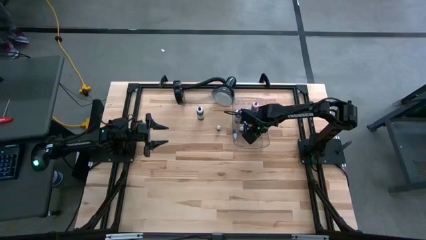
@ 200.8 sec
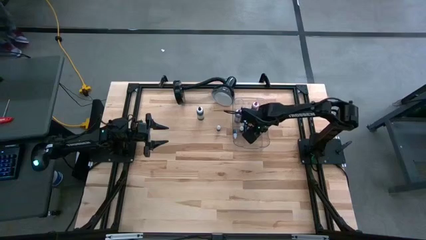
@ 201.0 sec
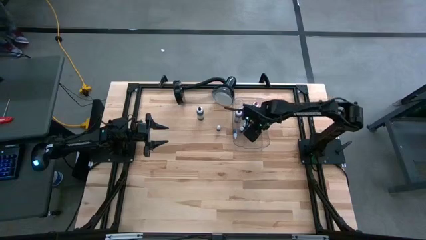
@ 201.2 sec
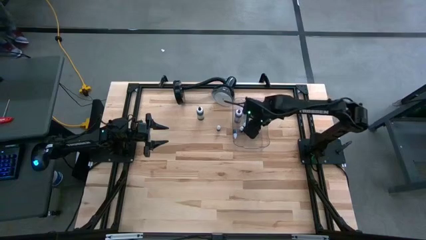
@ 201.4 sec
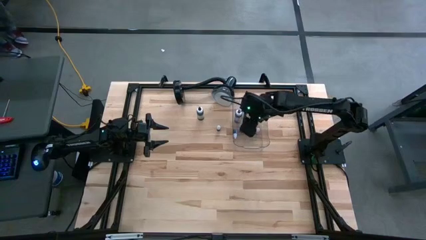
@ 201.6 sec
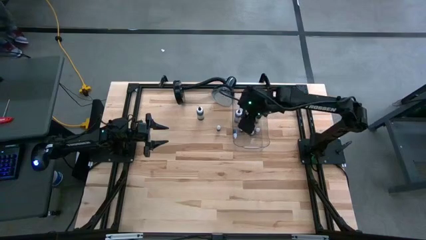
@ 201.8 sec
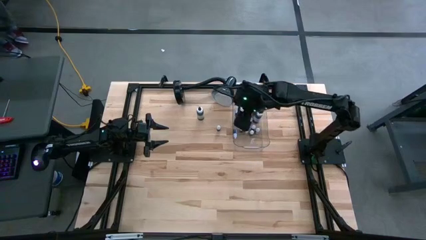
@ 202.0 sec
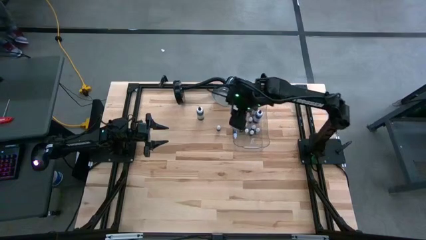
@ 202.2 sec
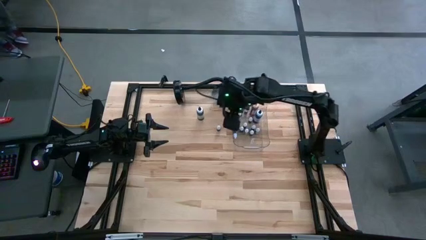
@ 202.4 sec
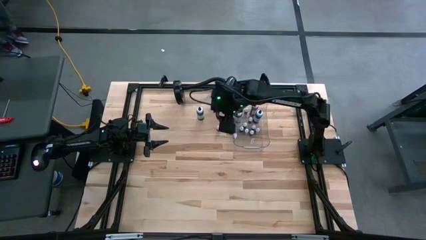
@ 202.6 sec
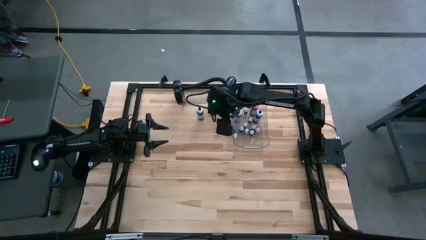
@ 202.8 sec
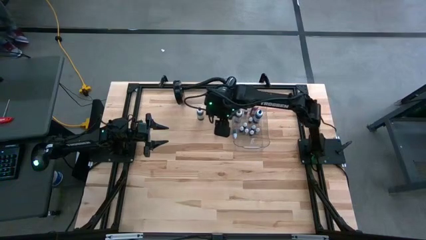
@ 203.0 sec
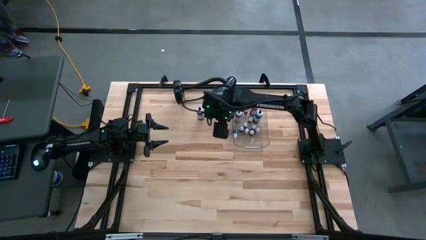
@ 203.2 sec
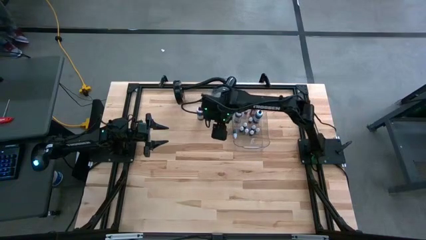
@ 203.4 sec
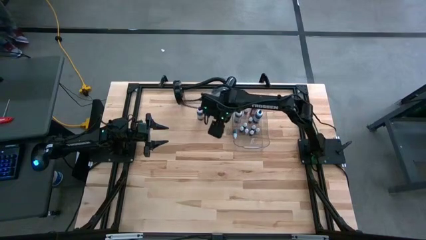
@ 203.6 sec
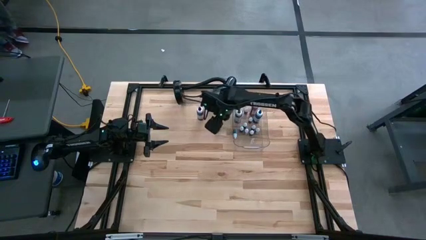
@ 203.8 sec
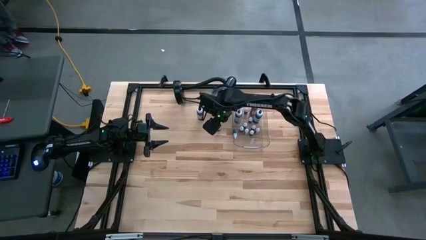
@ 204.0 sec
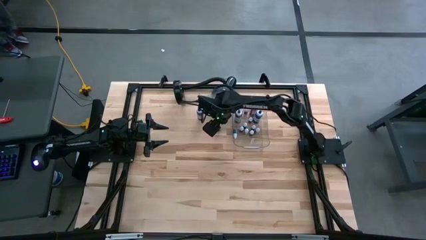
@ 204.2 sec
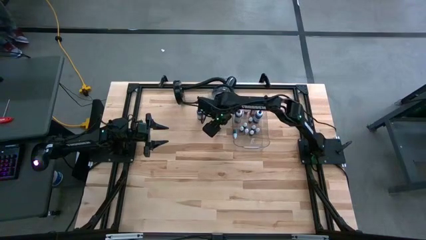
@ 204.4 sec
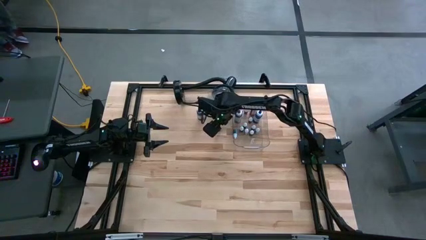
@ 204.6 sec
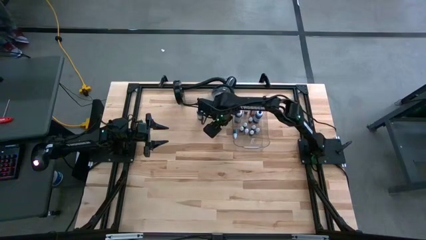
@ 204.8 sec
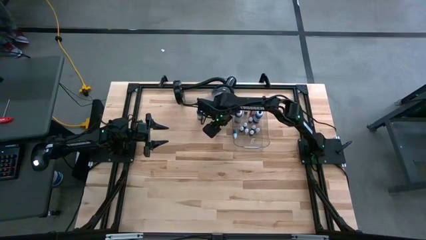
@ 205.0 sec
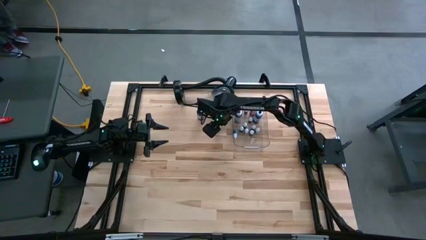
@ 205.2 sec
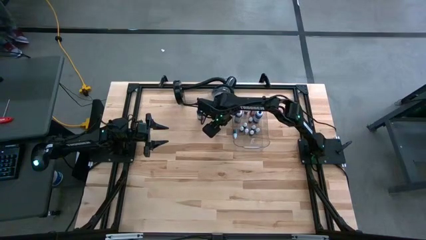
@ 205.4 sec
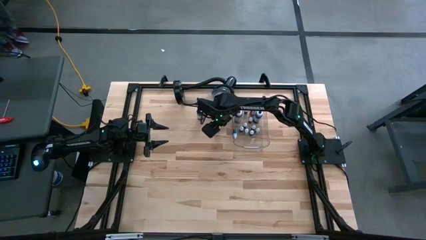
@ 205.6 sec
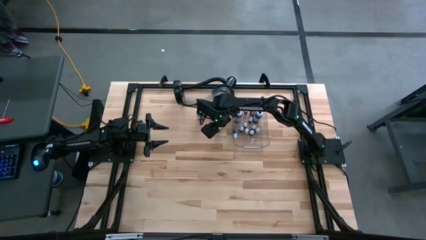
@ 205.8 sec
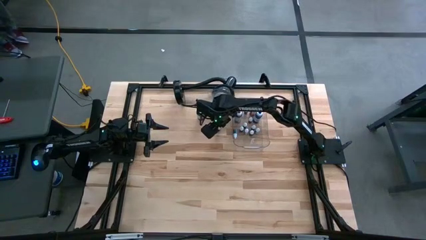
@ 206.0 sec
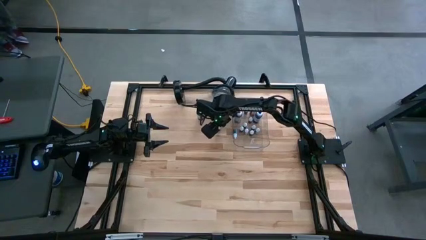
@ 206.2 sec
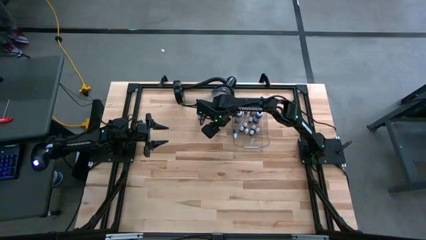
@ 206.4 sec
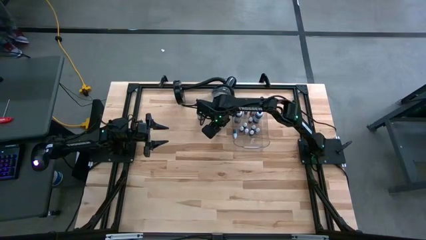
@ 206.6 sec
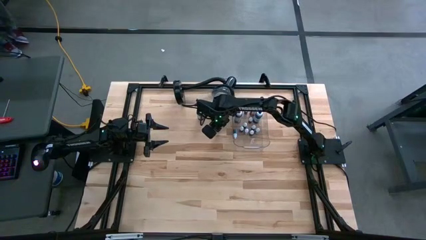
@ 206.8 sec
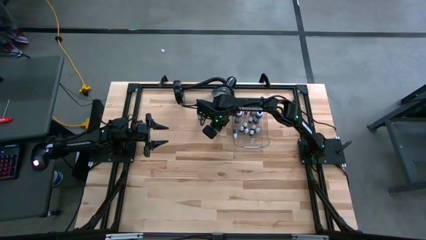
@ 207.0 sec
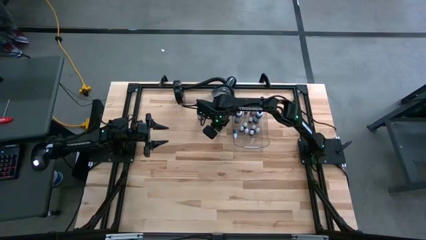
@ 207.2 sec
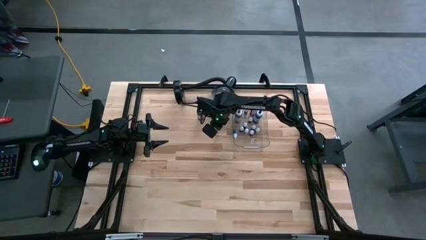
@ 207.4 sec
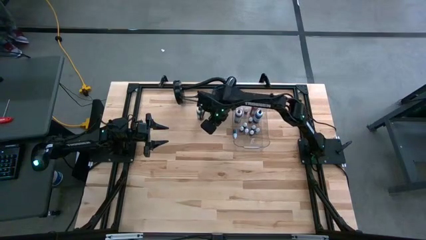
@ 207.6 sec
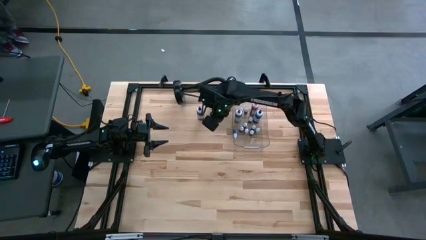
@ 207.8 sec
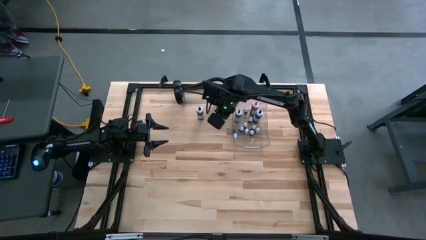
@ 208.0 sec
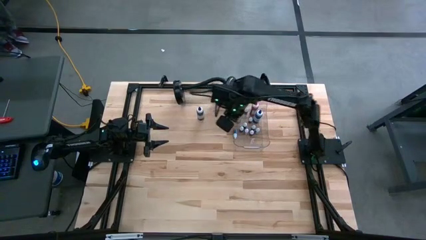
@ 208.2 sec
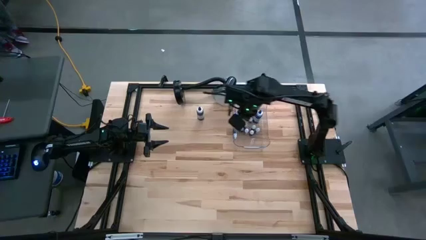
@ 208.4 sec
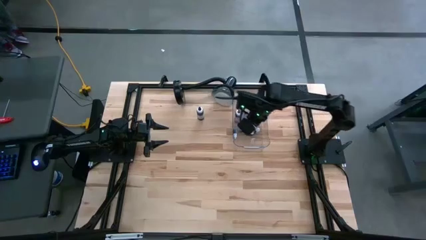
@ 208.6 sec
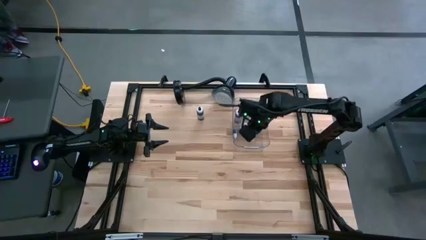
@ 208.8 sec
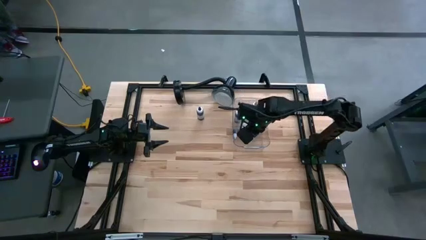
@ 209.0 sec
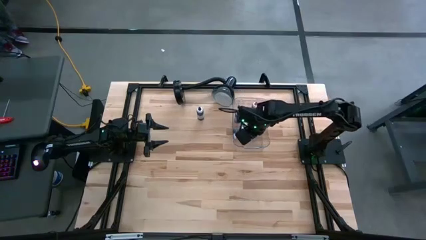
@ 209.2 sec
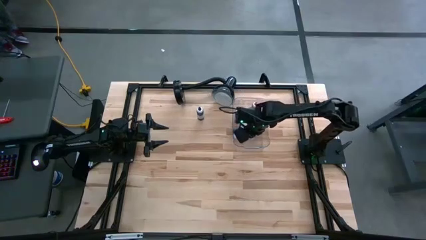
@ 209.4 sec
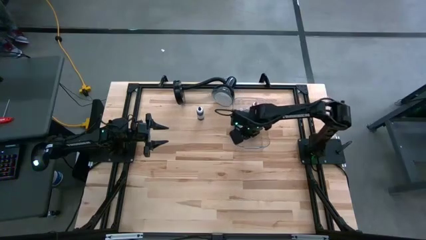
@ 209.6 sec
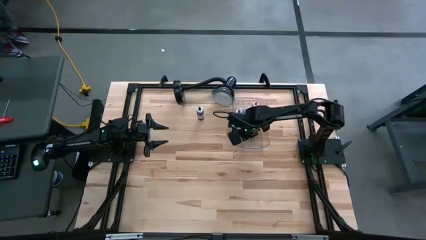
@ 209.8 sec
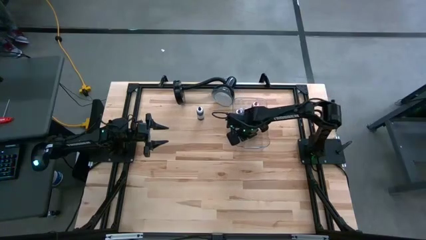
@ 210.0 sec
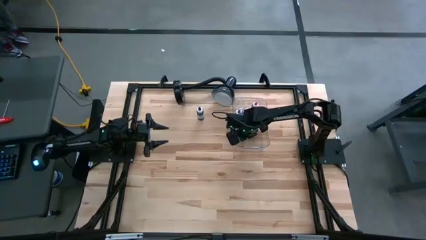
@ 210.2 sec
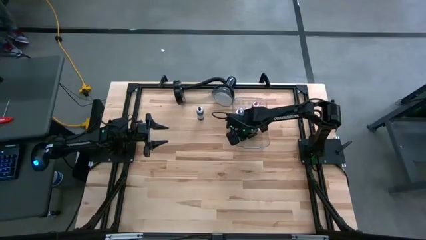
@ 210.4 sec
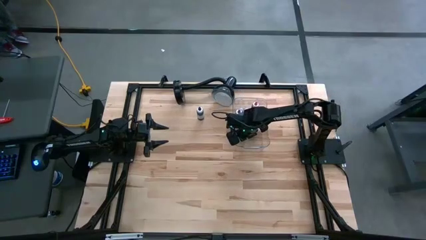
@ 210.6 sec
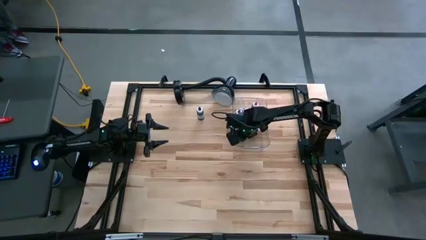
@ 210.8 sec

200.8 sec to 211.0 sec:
Task: Pick & Place food coloring
Put the small dark blue food coloring bottle into the transparent bin

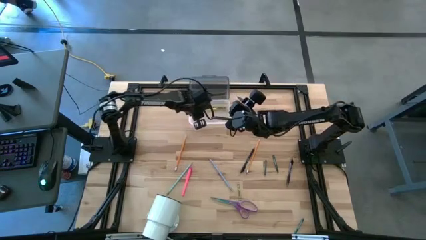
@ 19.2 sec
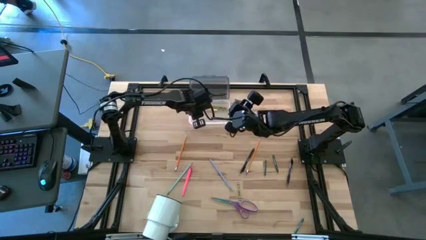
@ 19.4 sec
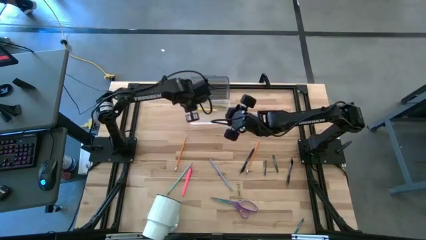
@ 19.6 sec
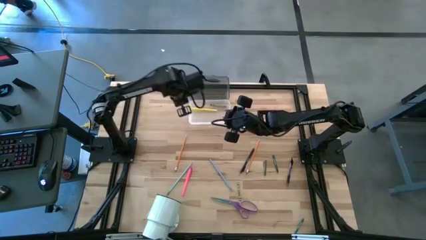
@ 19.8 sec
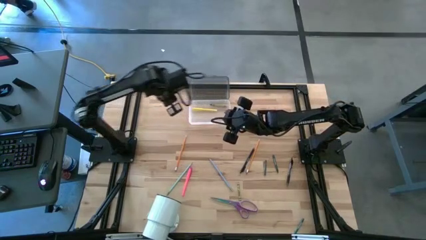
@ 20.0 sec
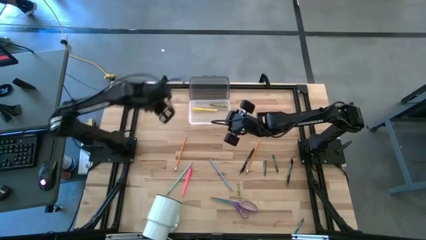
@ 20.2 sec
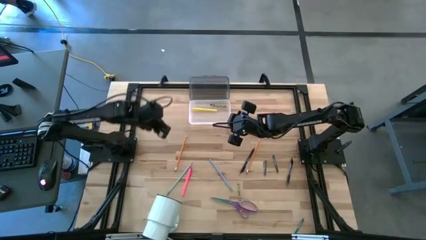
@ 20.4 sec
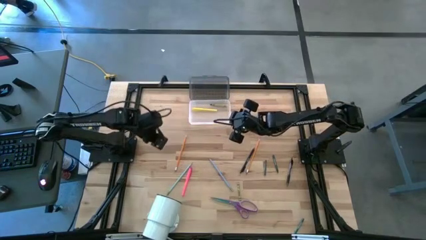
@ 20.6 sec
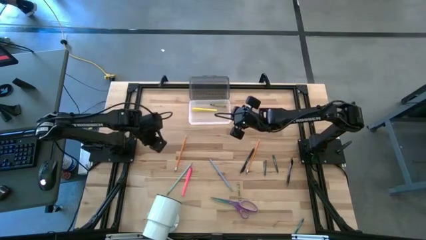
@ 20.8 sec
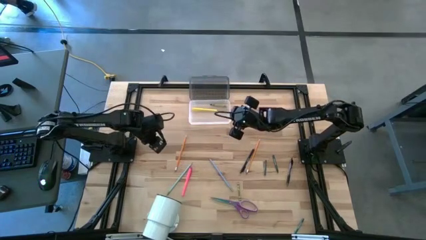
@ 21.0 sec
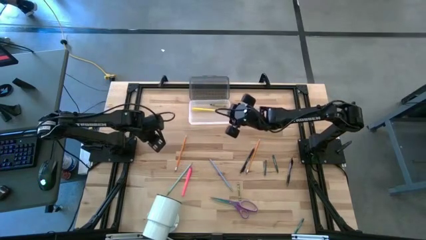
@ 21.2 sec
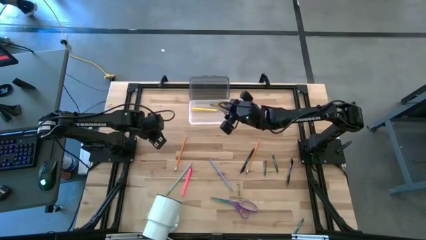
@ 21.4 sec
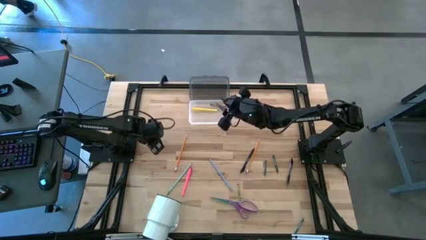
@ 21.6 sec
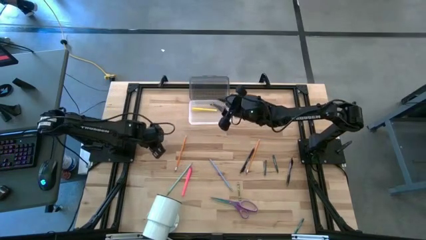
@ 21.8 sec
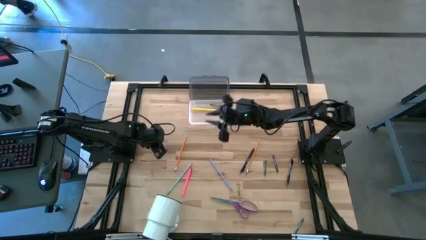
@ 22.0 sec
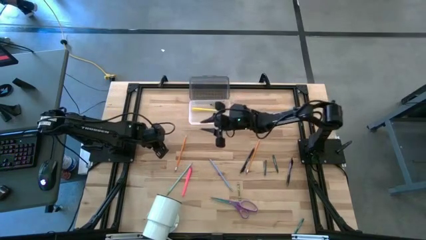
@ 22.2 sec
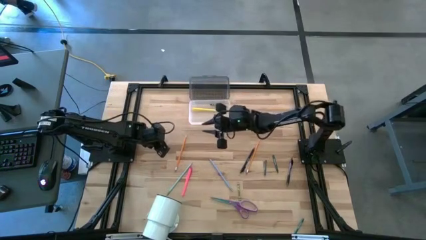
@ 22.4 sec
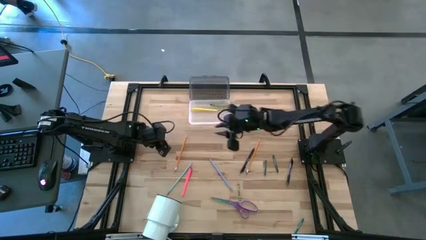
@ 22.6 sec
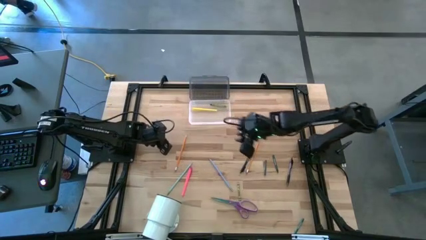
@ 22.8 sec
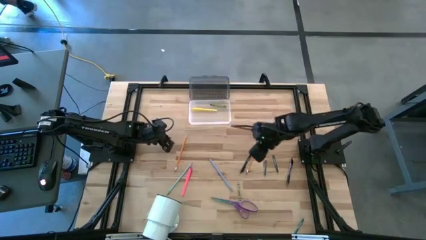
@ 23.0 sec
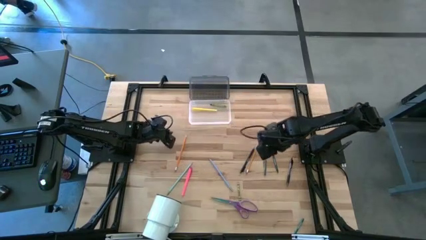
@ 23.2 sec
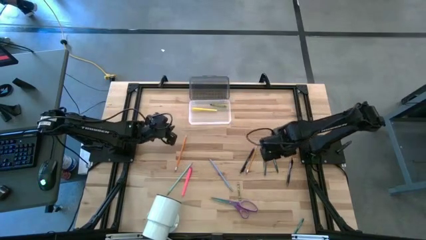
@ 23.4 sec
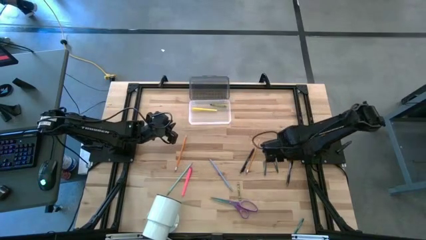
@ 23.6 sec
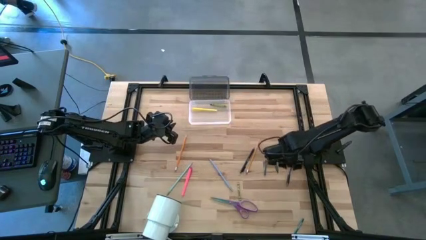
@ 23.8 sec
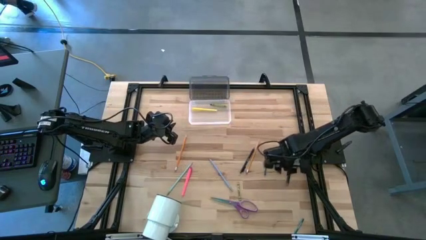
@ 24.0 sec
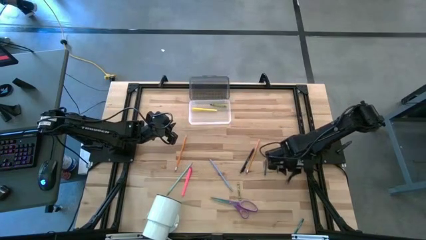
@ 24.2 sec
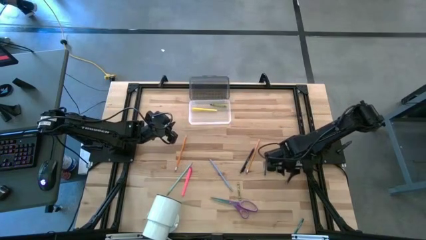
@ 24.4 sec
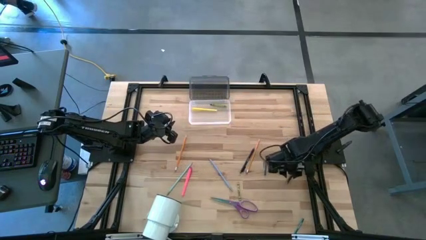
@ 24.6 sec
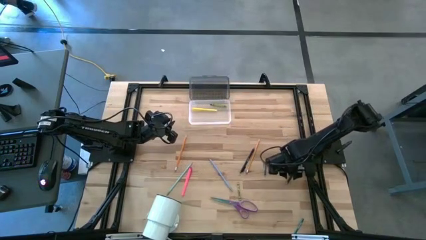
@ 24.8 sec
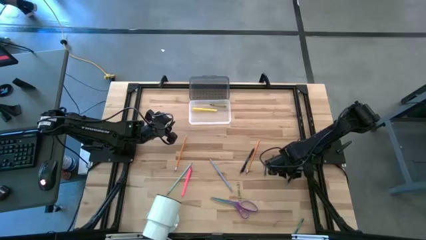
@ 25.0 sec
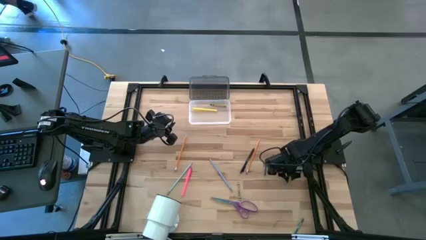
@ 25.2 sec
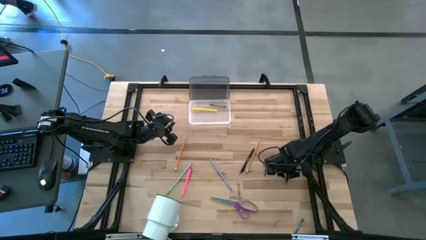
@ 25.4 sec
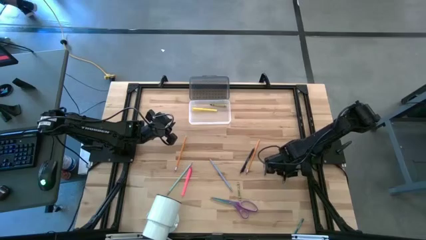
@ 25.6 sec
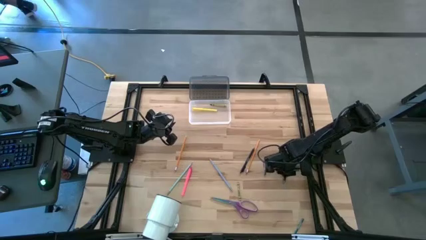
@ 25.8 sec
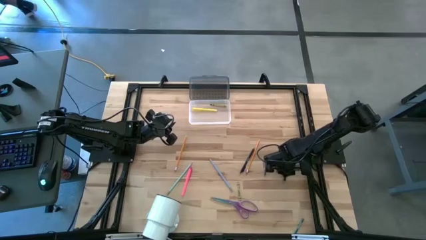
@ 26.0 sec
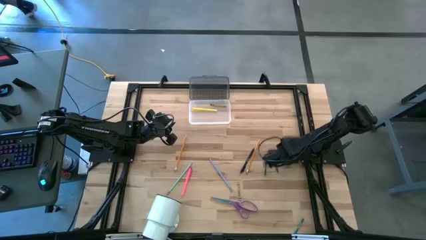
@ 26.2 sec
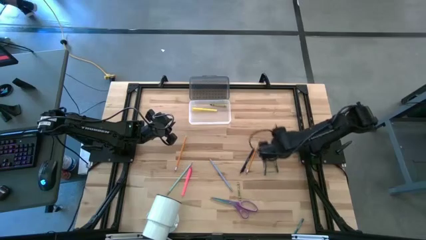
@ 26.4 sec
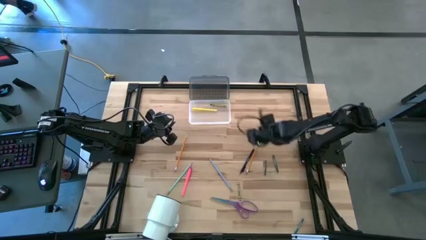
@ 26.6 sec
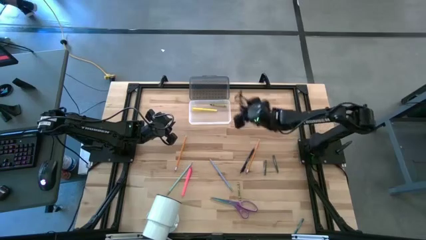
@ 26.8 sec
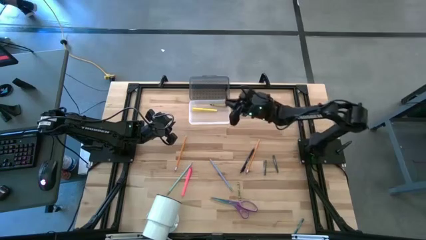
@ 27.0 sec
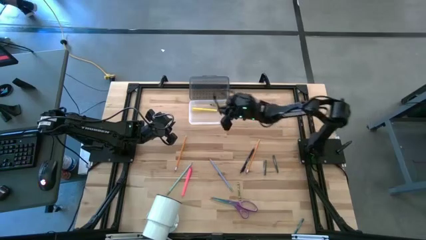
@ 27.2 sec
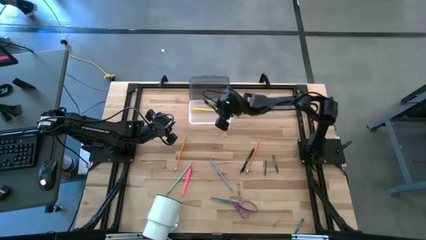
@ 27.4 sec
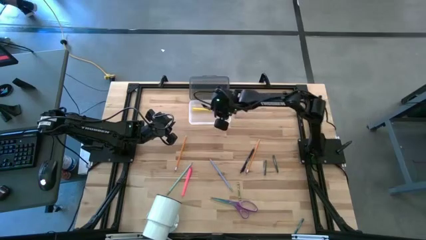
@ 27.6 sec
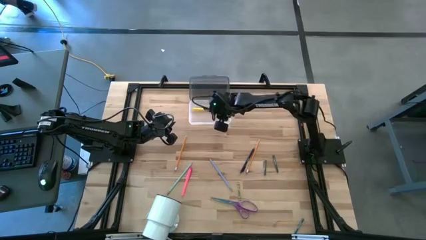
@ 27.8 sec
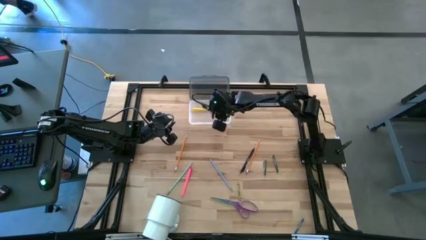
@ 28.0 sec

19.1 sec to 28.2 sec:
Task: Pick & place school supplies into a supply box
Put the right black pen into the supply box
